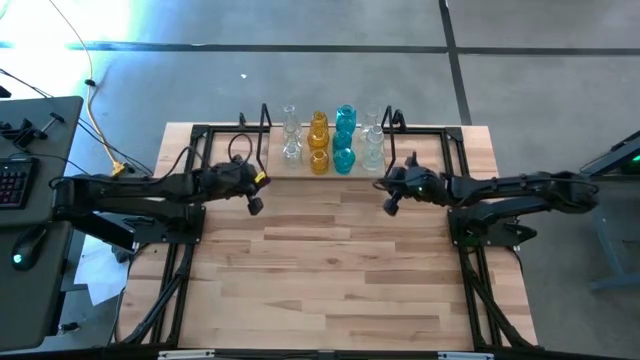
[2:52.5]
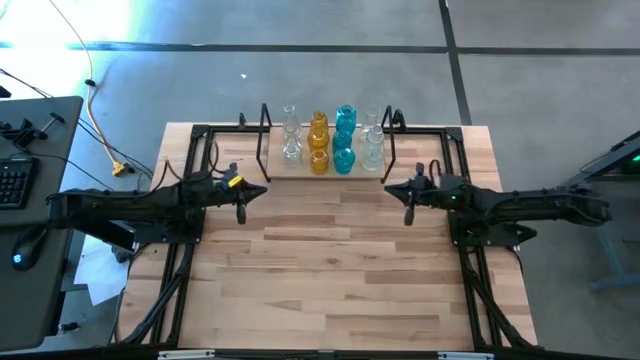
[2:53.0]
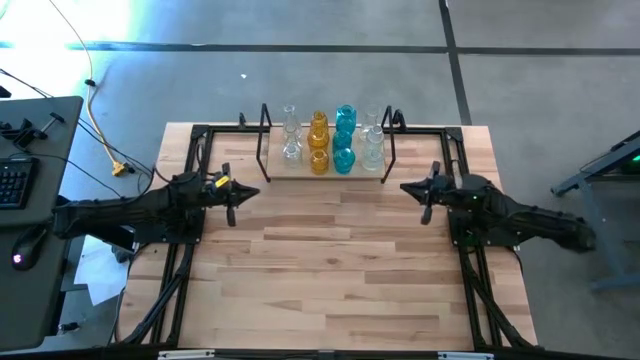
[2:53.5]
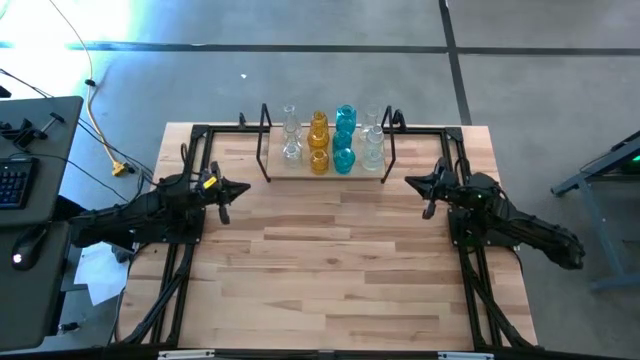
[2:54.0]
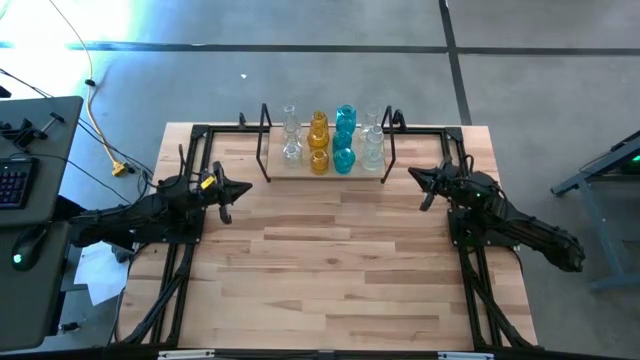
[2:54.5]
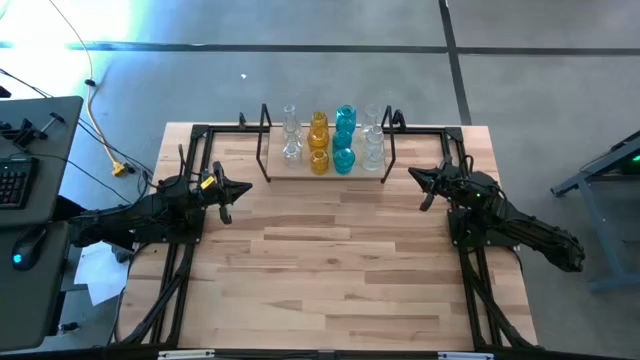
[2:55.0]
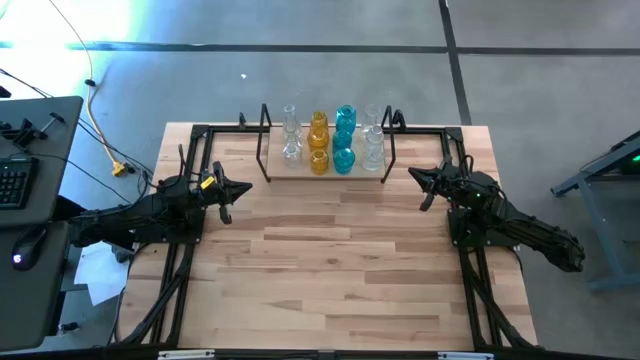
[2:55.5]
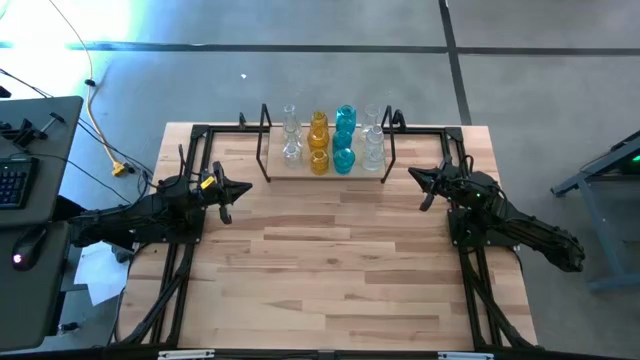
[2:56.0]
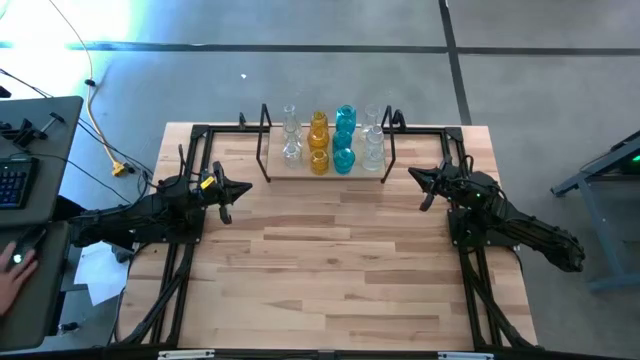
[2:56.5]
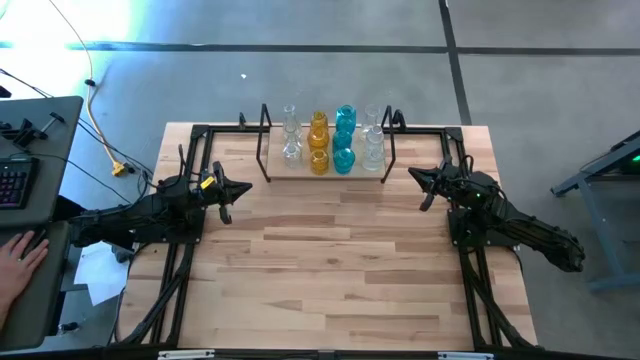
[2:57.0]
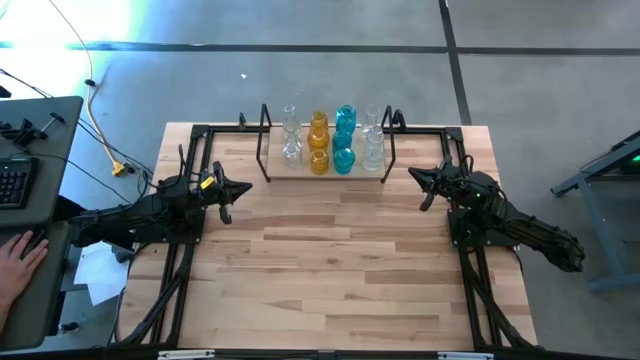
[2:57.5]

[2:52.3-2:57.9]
Task: sort vases onto shelf
Return to Home Position

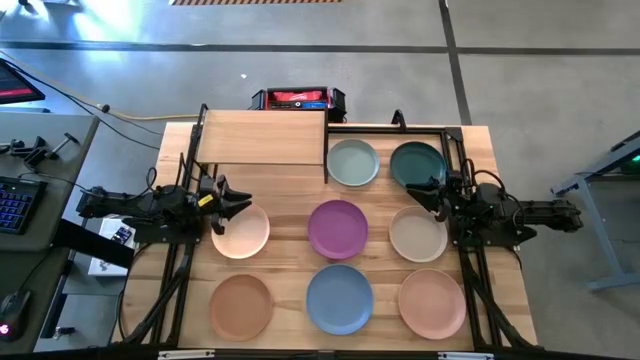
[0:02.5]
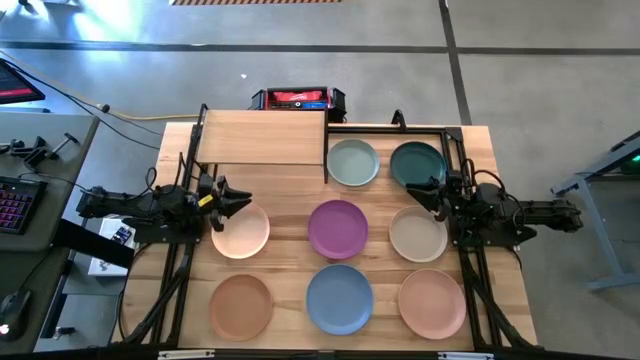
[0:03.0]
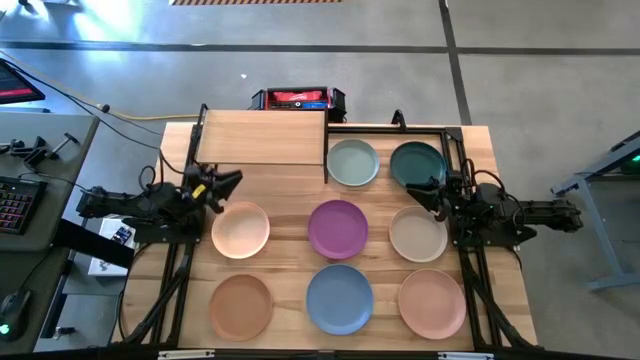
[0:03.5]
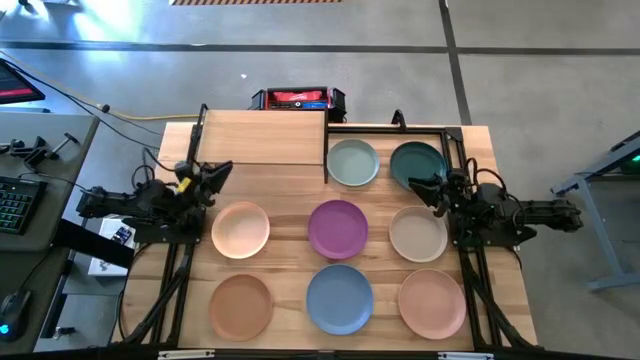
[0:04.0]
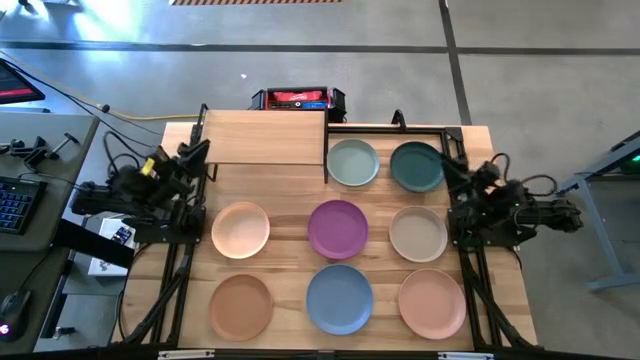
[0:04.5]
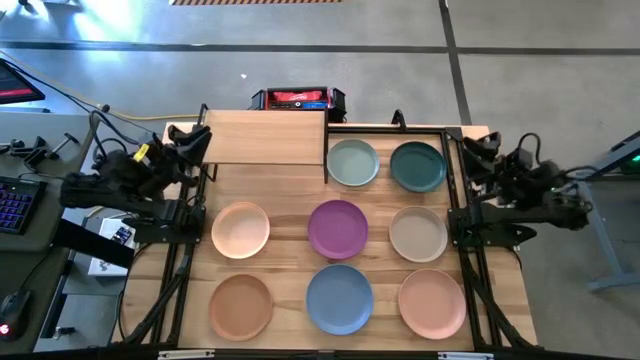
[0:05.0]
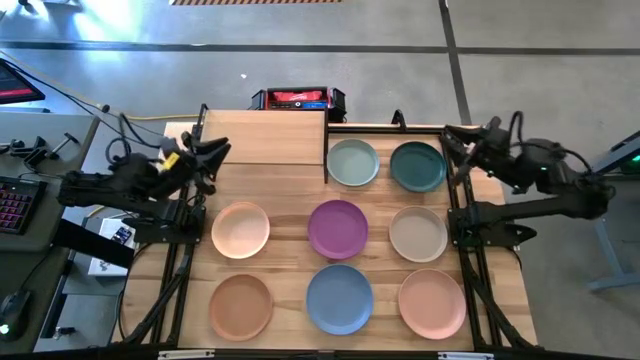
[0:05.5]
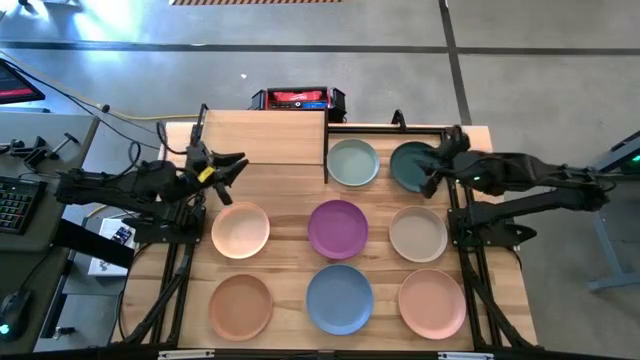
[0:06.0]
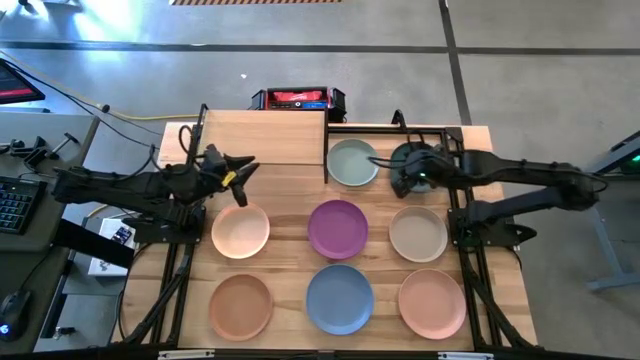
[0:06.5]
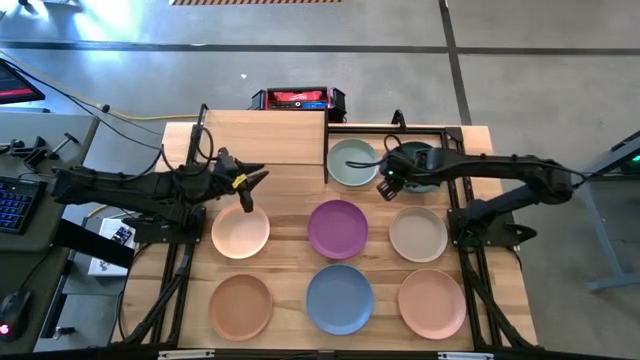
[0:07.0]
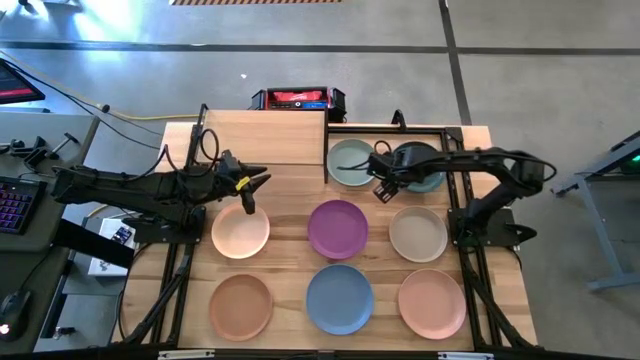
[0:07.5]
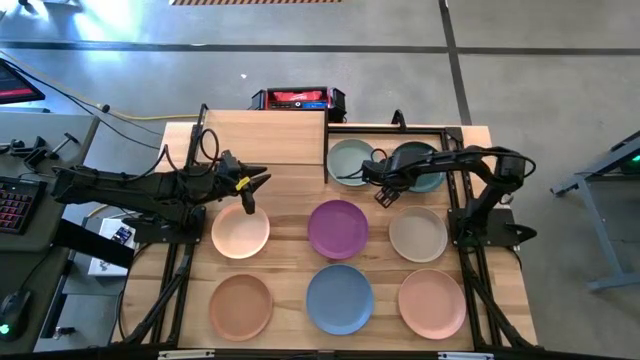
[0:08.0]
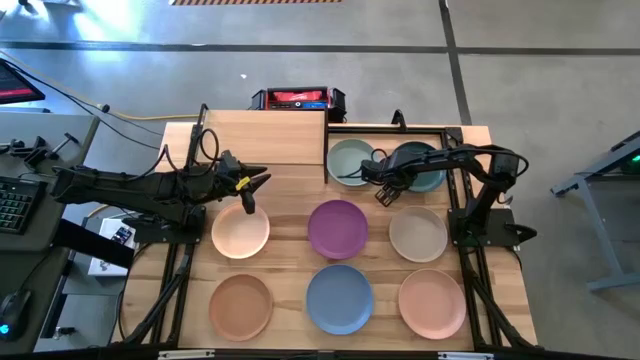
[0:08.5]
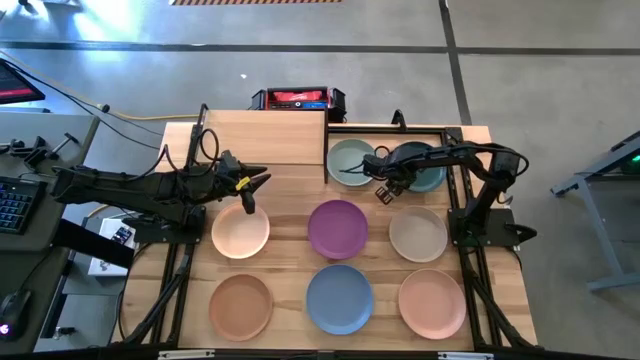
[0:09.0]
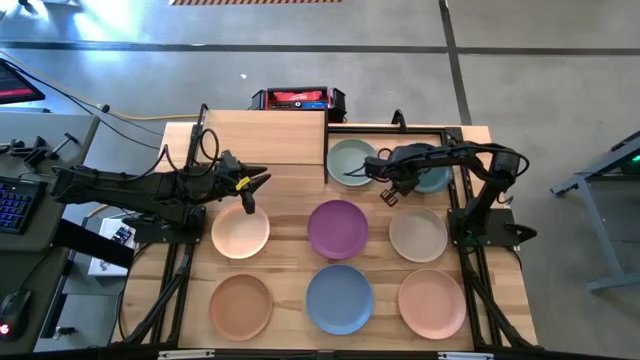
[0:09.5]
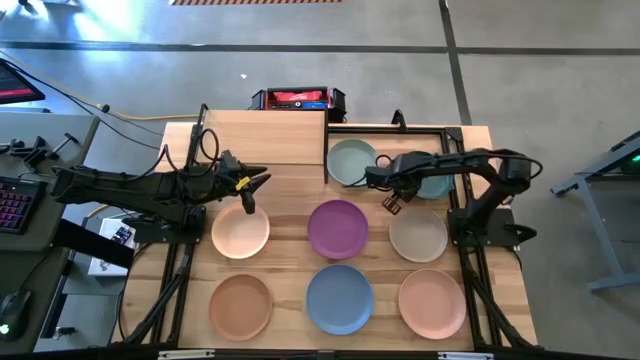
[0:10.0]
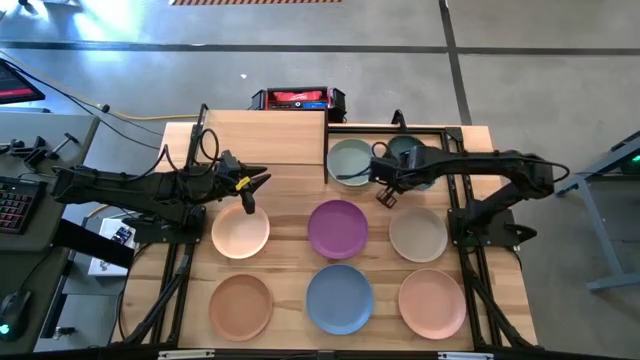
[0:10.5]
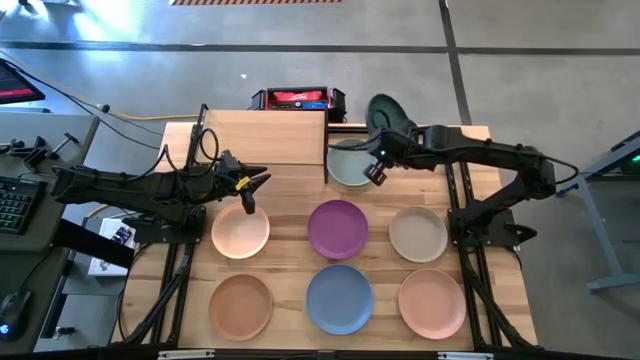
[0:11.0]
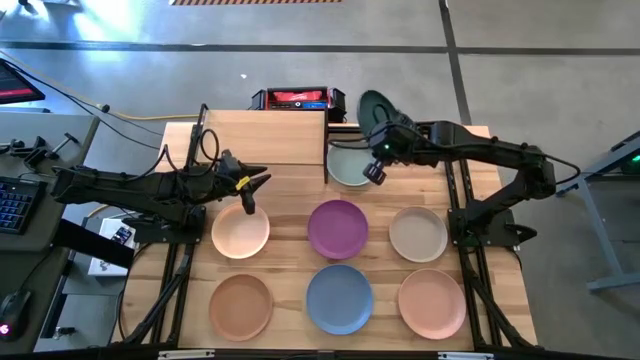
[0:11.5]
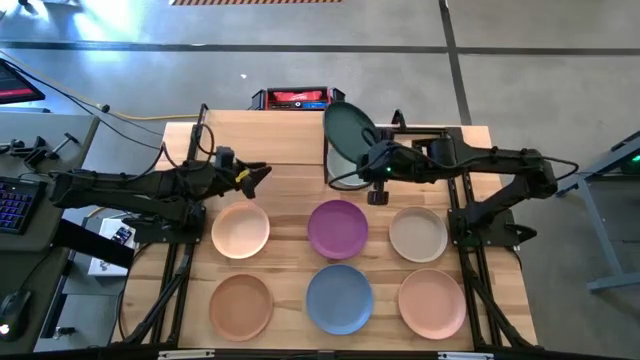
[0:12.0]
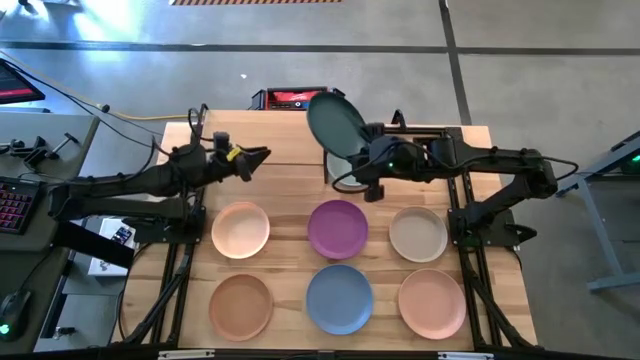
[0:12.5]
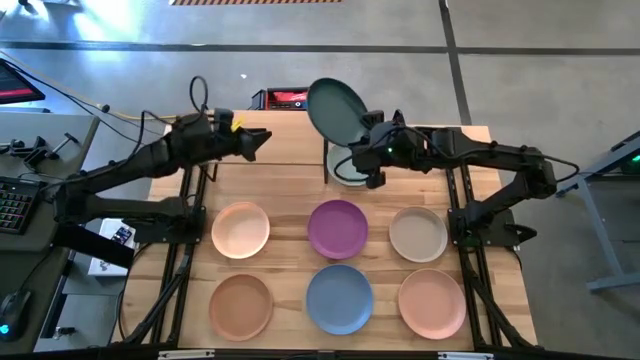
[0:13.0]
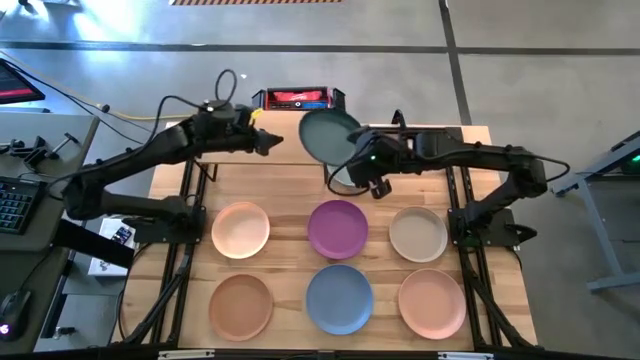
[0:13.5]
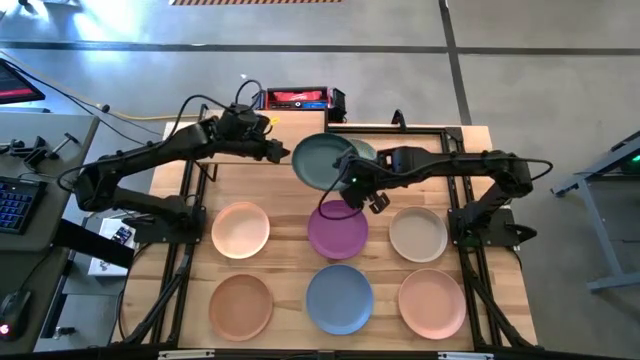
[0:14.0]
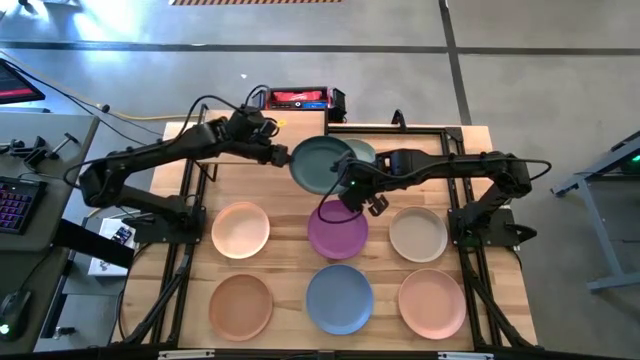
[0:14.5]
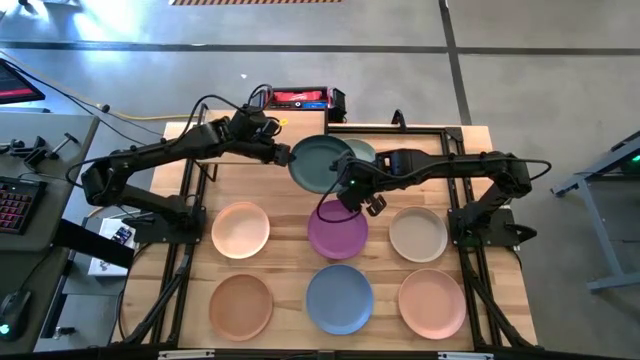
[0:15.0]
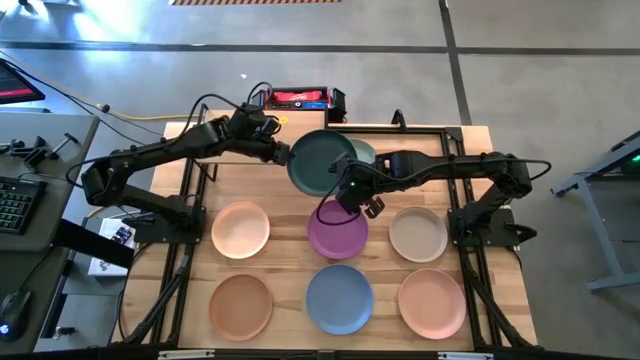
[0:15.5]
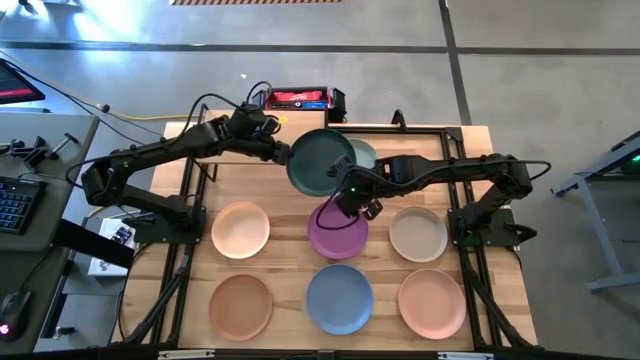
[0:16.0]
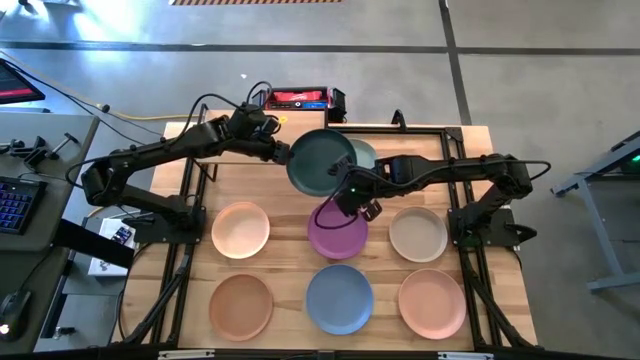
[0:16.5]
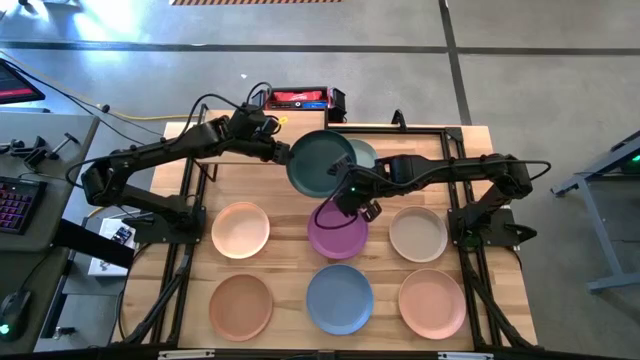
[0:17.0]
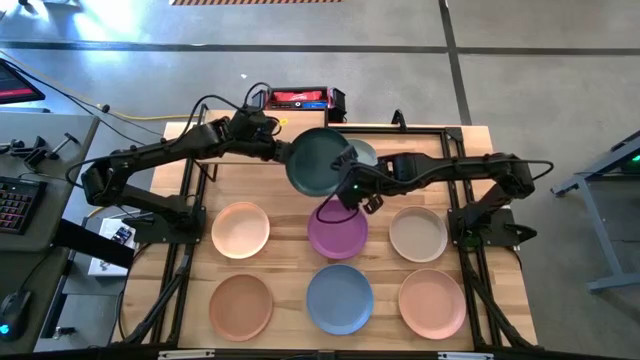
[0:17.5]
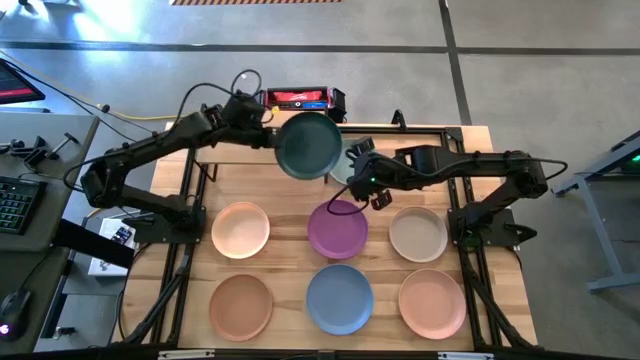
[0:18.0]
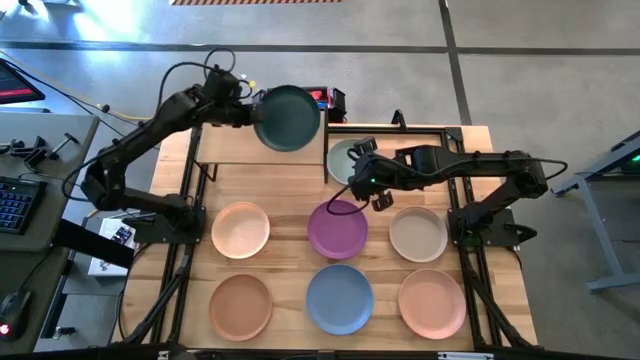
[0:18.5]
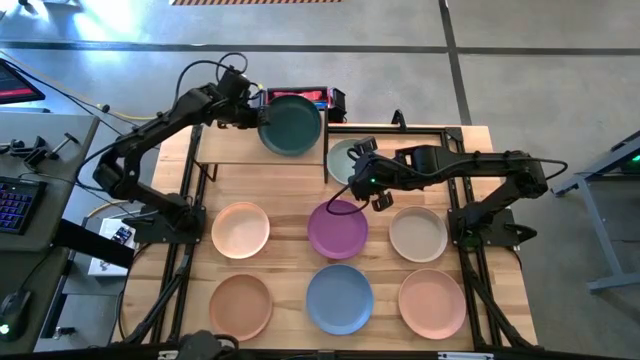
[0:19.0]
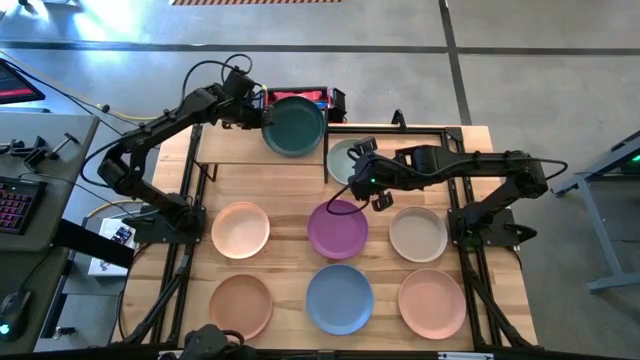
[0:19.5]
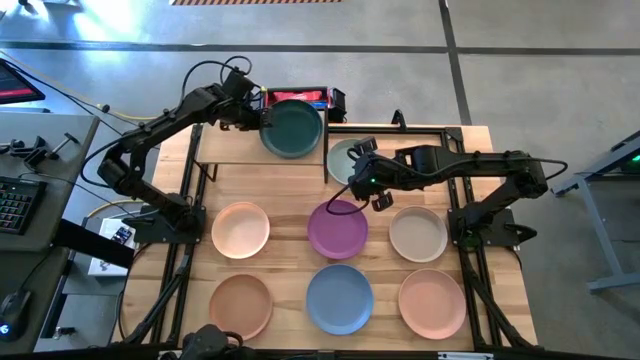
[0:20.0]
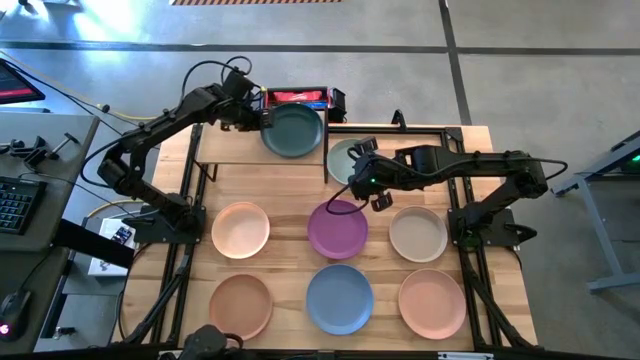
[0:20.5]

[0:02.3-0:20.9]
Task: Place and stack plates onto a shelf
Put the dark blue plate on the shelf
